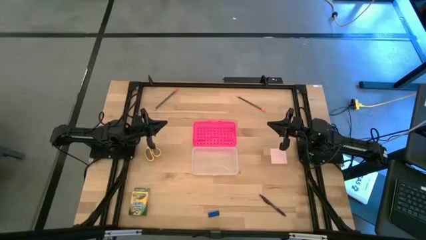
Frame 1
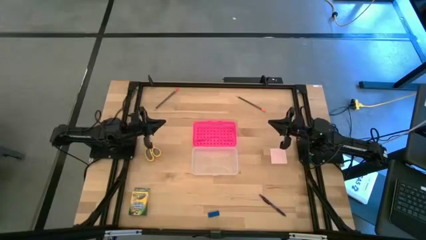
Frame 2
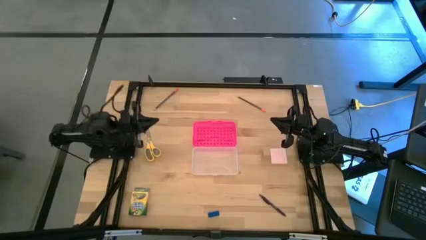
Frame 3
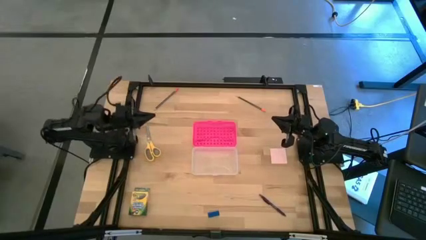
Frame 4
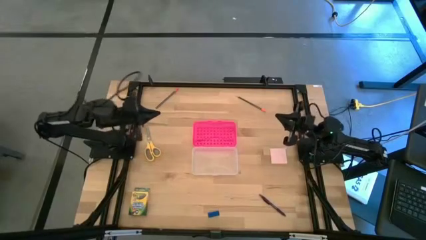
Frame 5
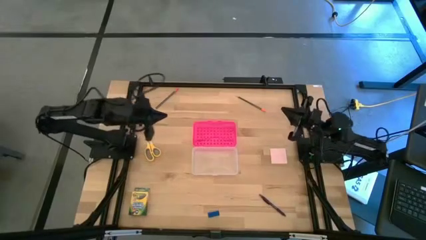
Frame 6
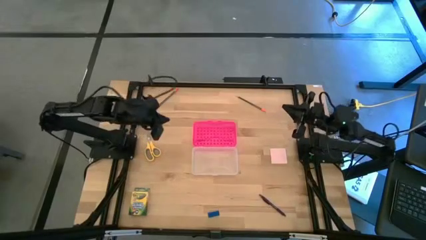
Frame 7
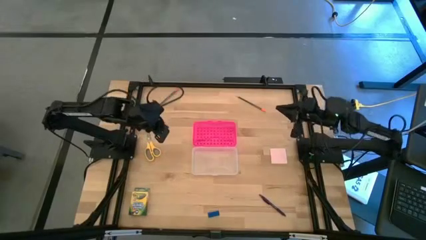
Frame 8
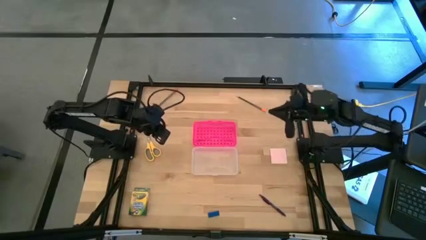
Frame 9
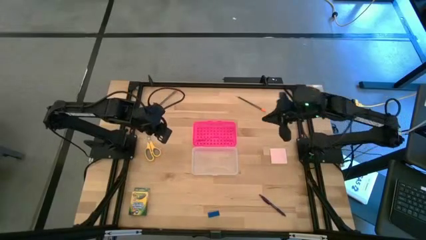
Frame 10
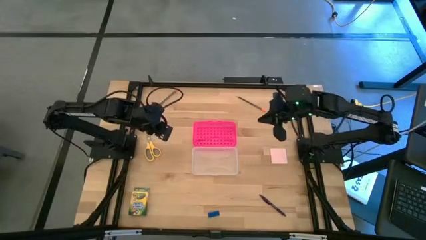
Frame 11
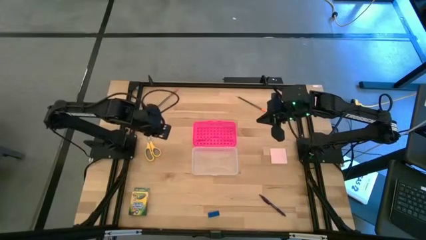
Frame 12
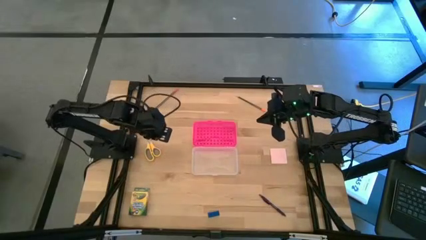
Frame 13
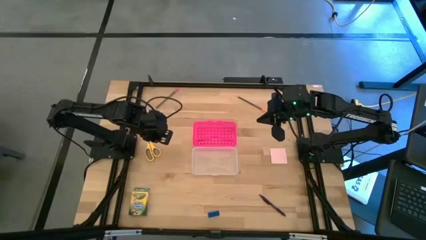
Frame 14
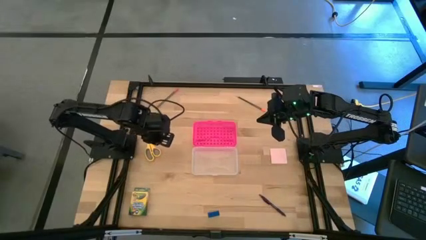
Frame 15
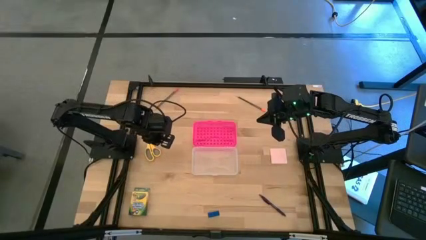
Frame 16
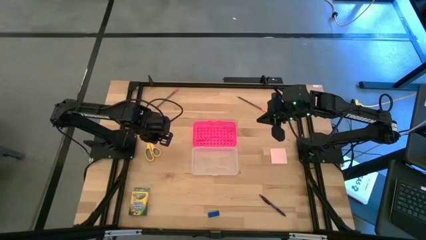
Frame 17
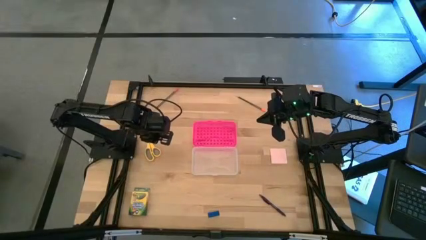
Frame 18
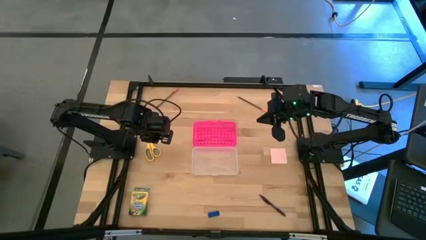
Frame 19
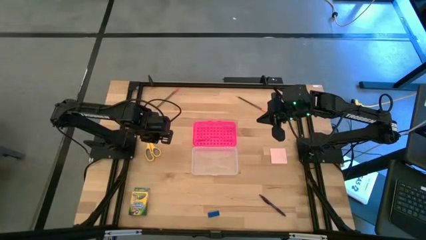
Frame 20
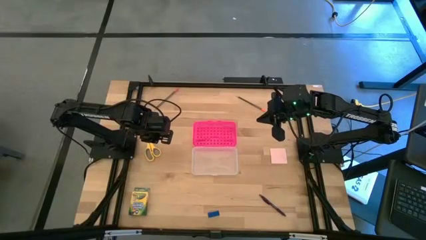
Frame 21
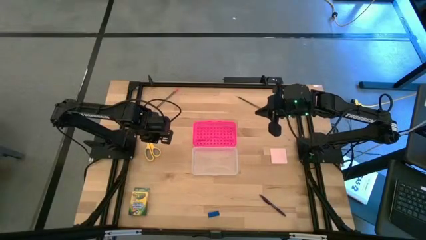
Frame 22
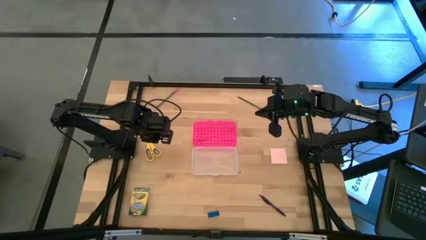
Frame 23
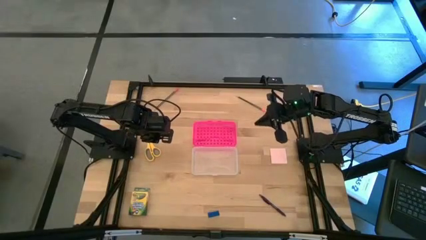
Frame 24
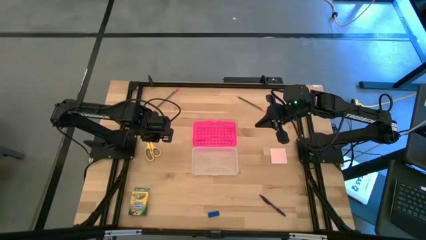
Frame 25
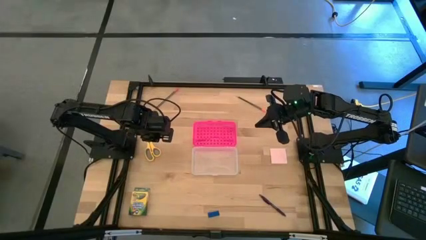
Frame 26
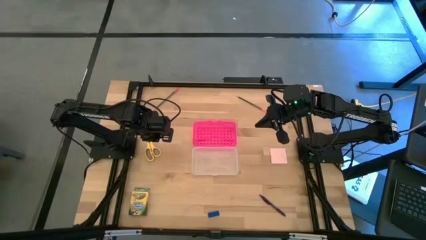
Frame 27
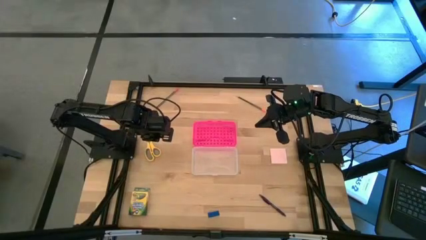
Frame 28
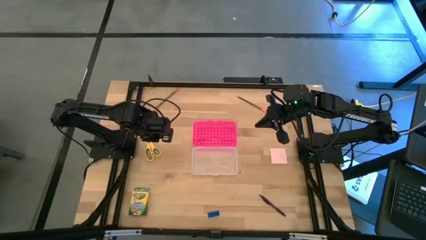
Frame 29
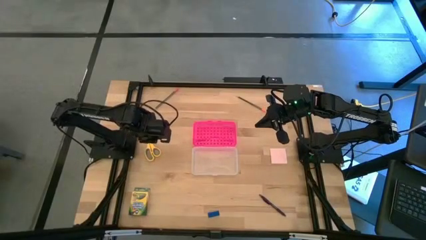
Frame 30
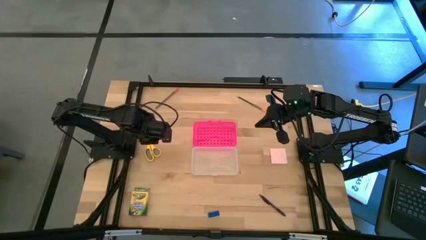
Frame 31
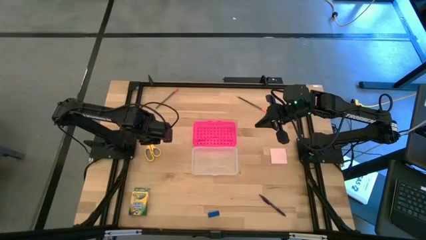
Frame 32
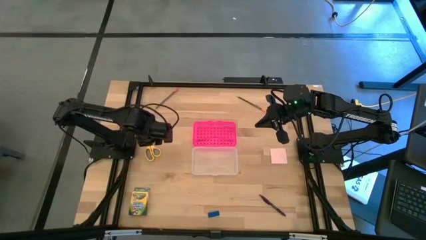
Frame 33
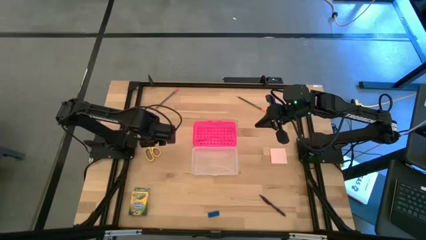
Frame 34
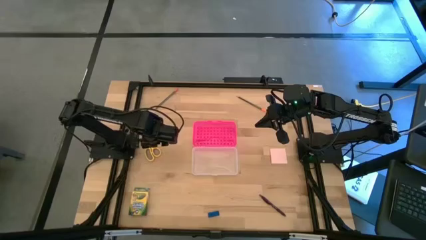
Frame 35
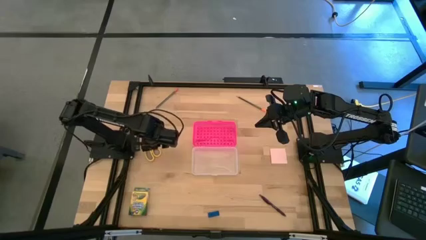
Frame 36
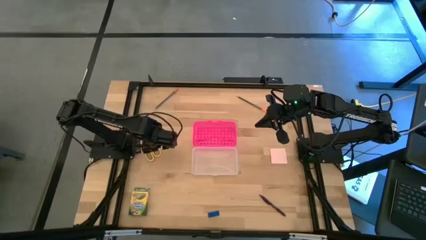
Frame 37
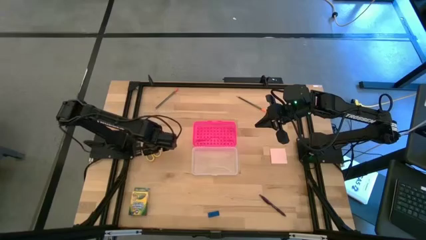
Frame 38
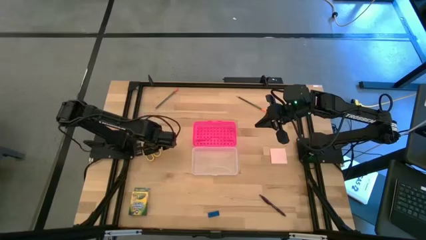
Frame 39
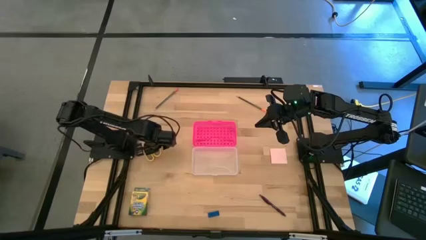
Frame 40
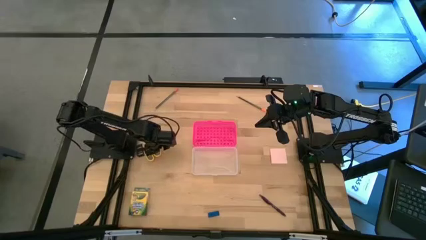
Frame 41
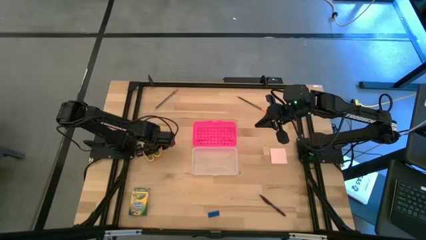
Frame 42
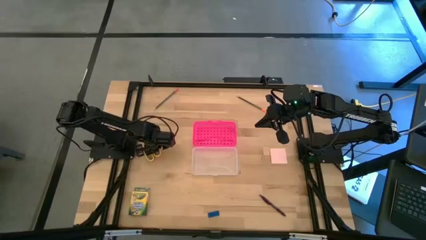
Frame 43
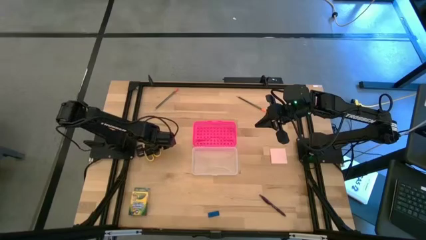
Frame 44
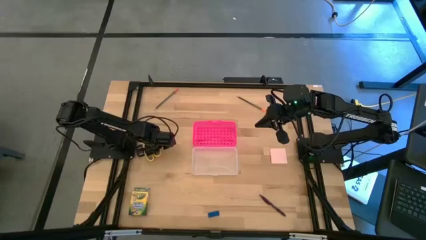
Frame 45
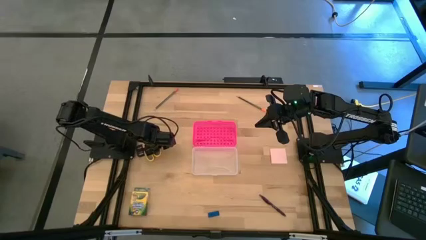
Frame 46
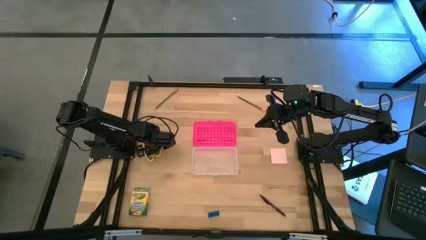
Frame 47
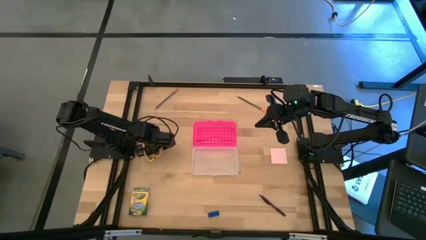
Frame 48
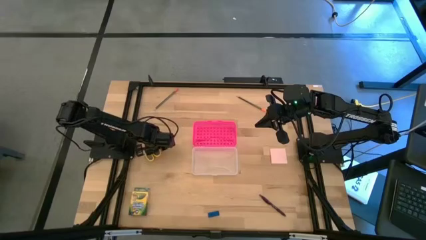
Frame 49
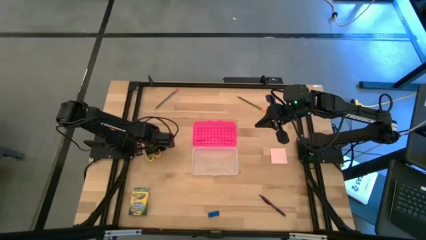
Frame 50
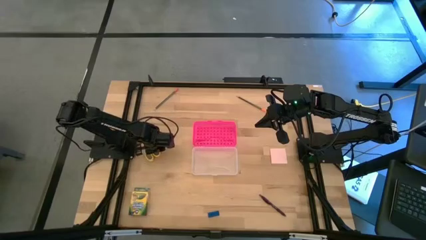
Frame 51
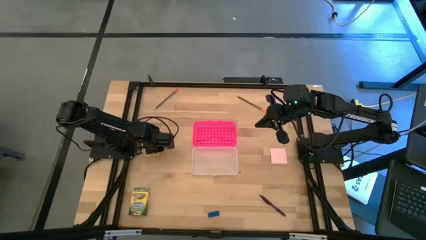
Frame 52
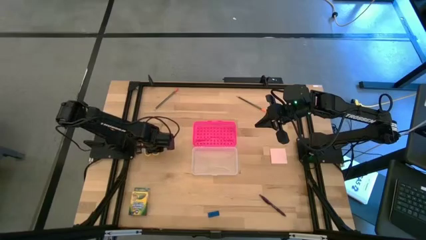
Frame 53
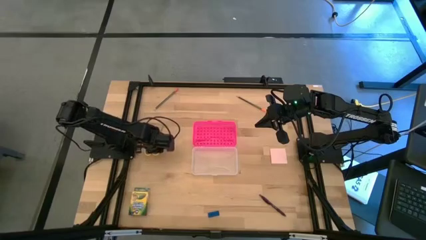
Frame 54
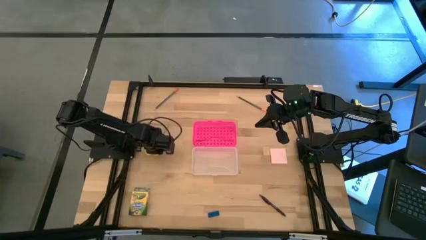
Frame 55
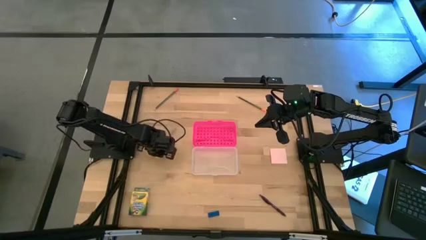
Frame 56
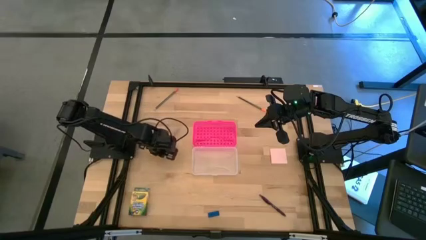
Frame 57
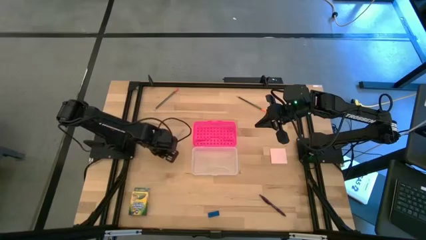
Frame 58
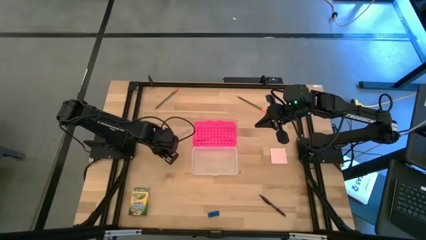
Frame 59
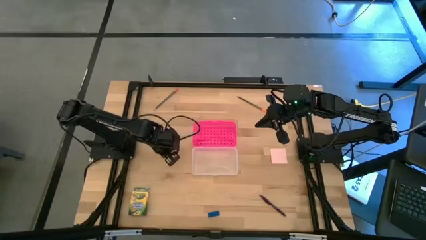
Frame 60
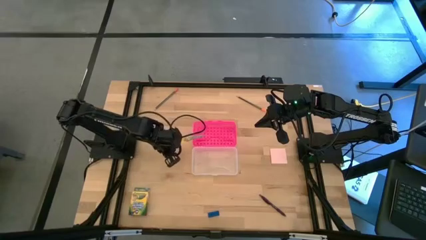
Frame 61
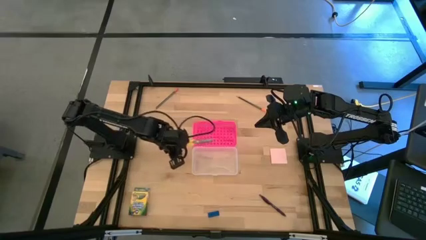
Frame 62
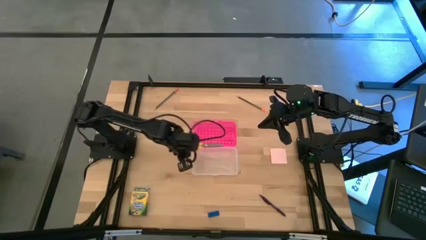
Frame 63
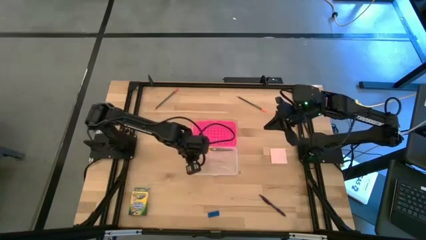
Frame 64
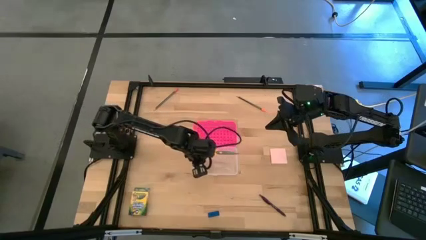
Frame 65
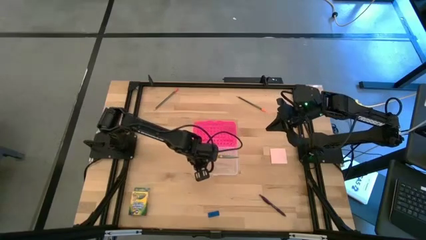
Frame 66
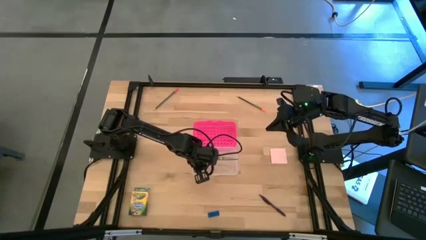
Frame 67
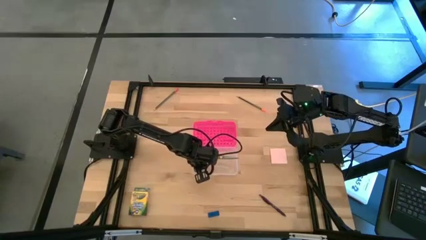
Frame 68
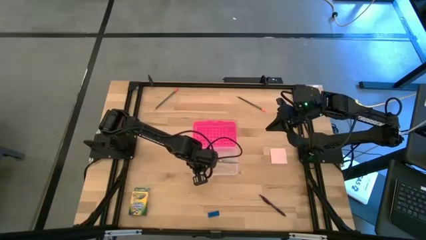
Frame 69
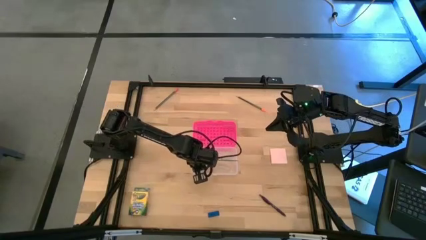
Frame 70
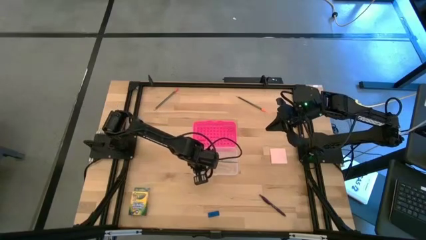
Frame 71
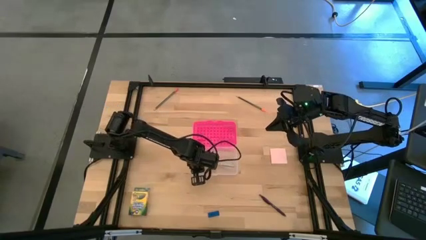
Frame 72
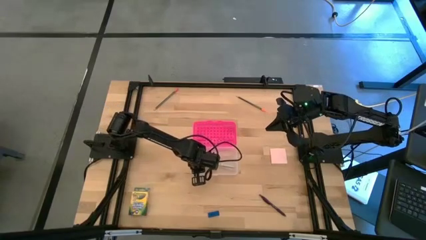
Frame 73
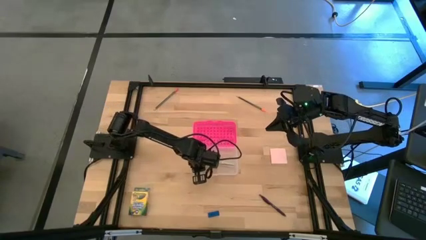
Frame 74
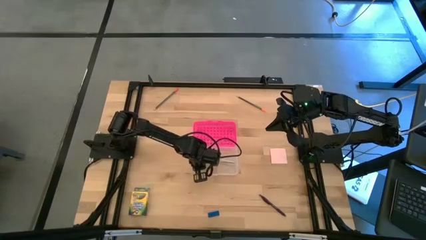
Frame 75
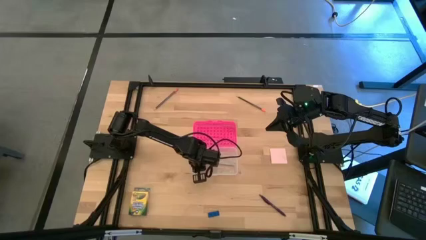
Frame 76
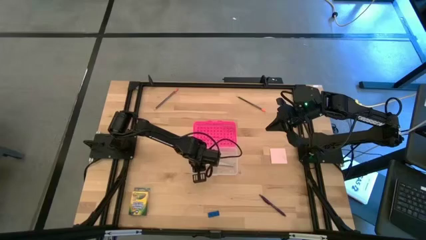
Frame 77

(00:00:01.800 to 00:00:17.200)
Task: Pack school essentials
Put the scissor into the pencil case
